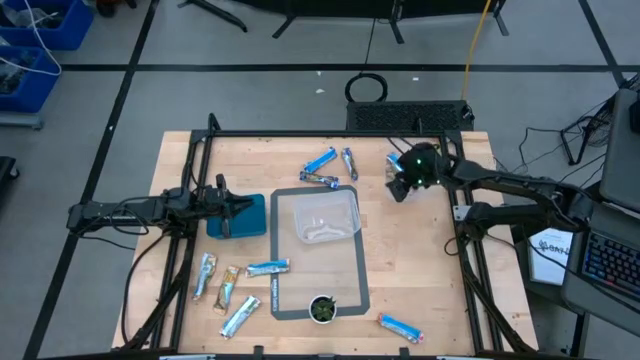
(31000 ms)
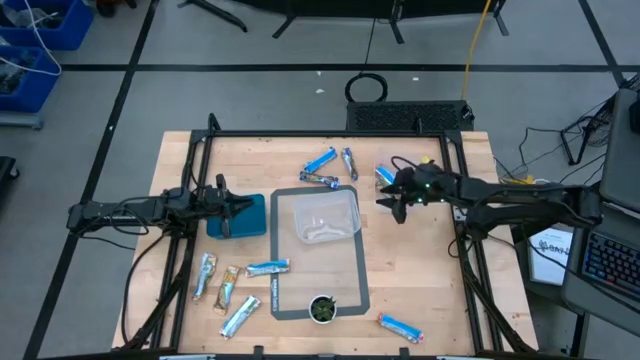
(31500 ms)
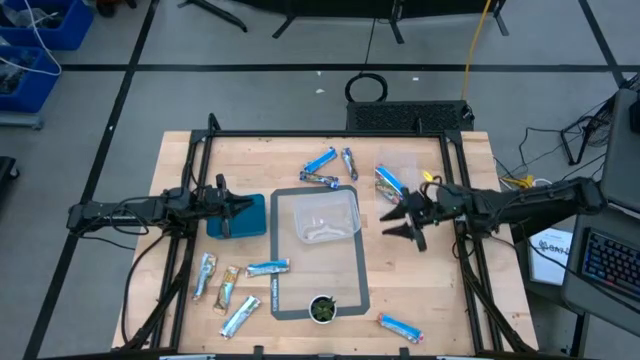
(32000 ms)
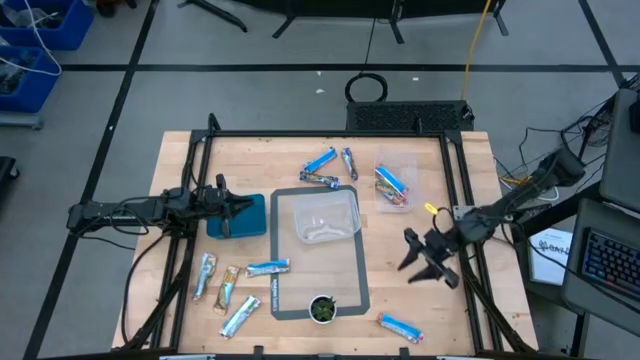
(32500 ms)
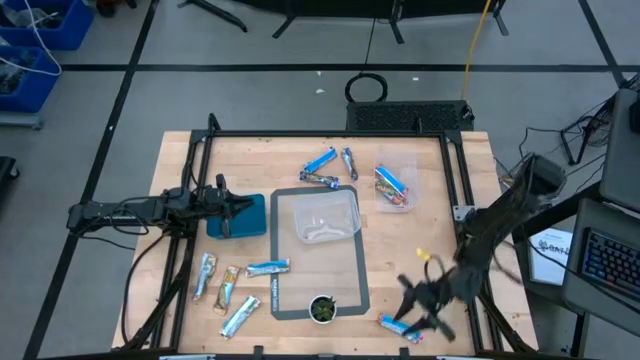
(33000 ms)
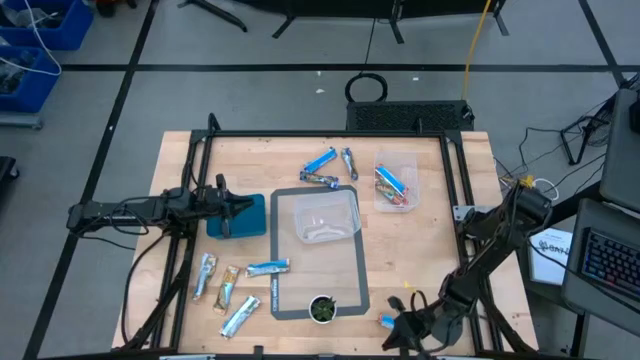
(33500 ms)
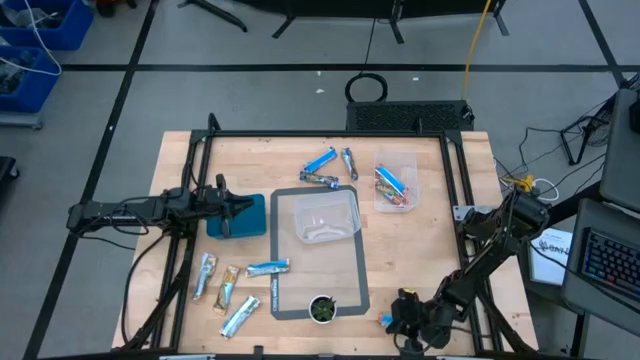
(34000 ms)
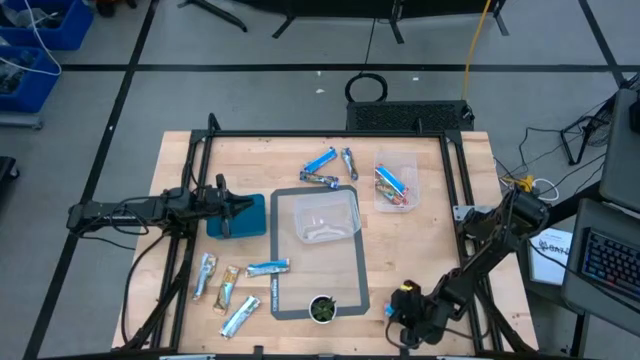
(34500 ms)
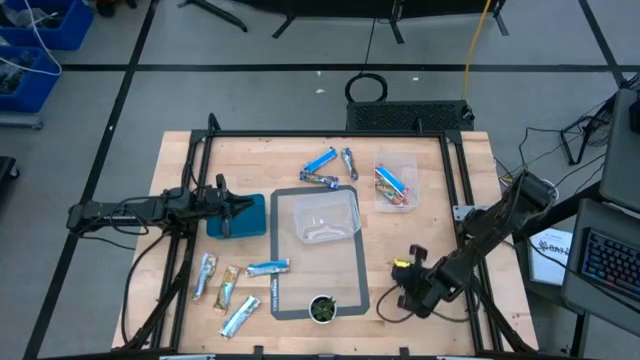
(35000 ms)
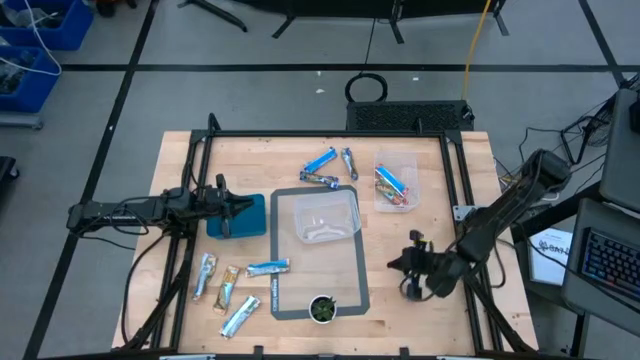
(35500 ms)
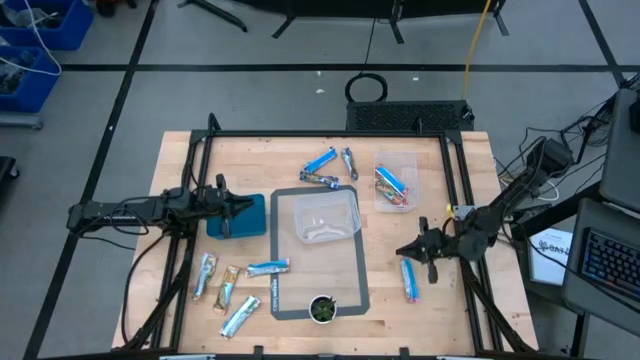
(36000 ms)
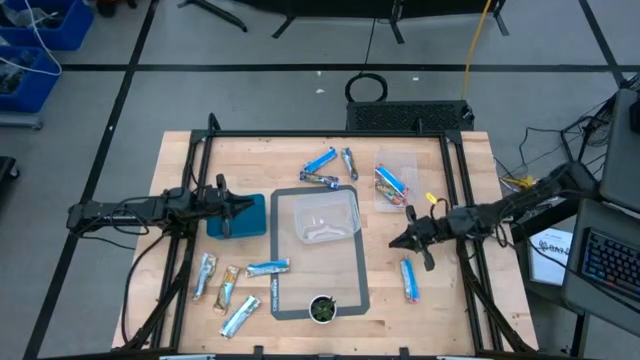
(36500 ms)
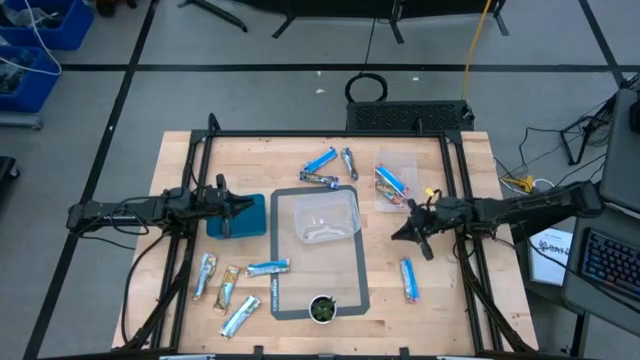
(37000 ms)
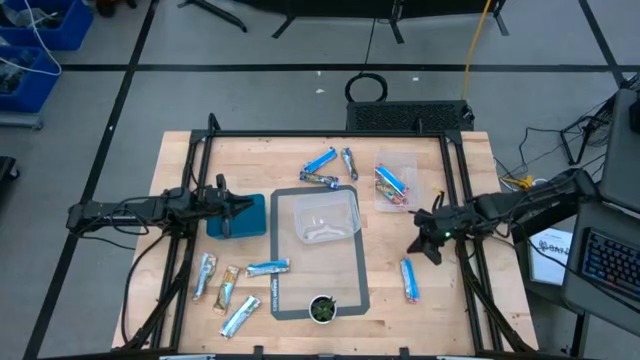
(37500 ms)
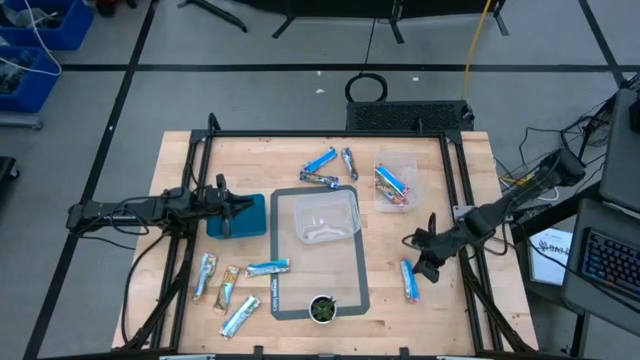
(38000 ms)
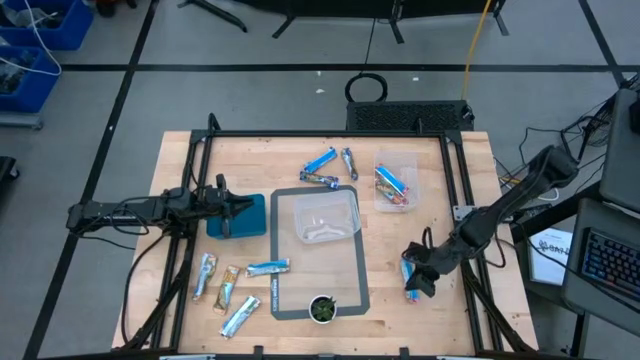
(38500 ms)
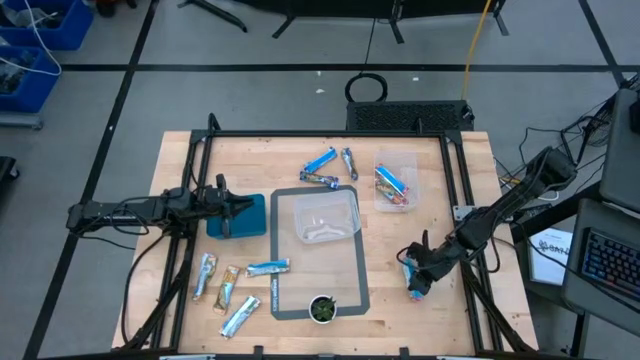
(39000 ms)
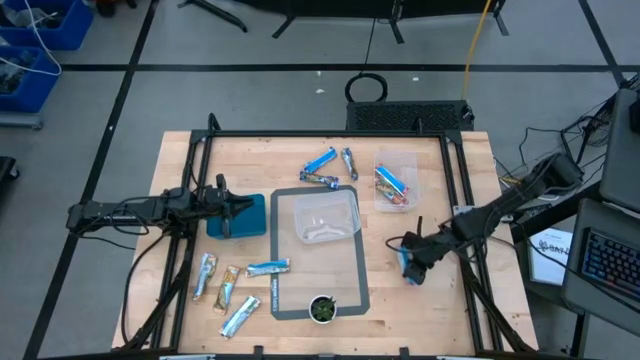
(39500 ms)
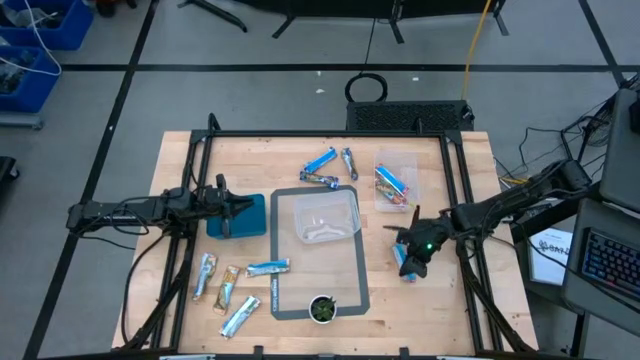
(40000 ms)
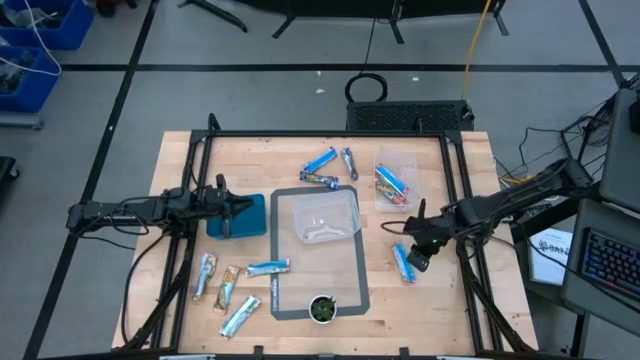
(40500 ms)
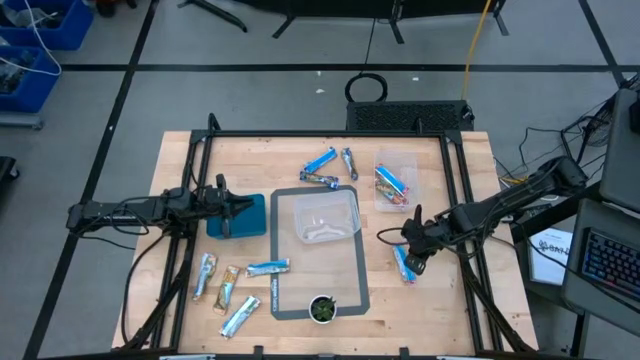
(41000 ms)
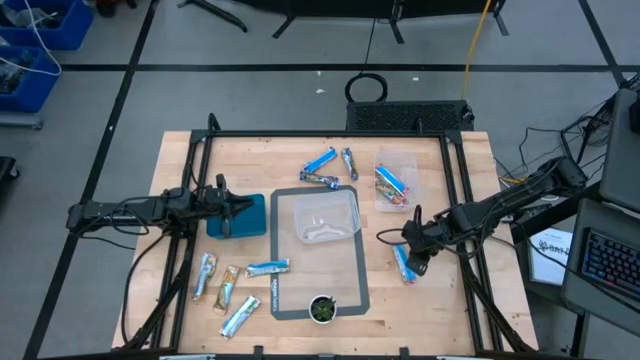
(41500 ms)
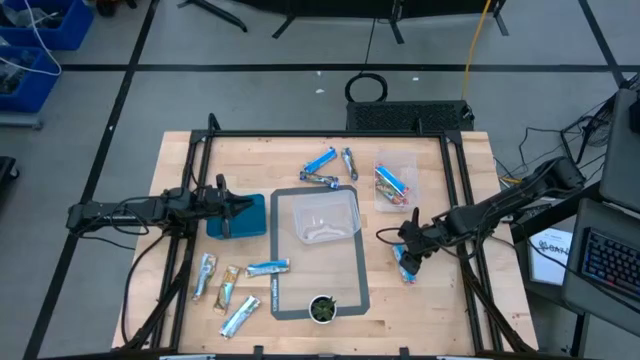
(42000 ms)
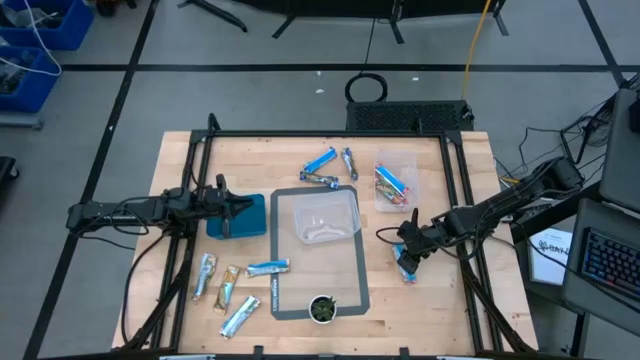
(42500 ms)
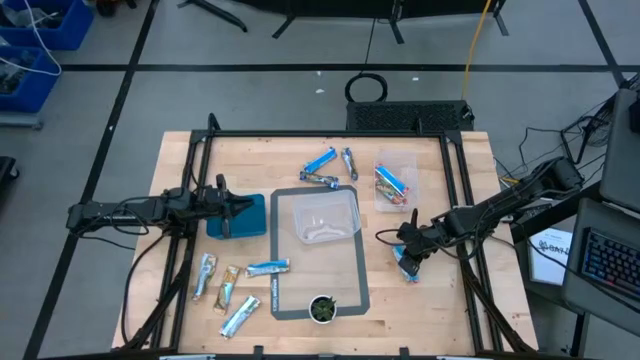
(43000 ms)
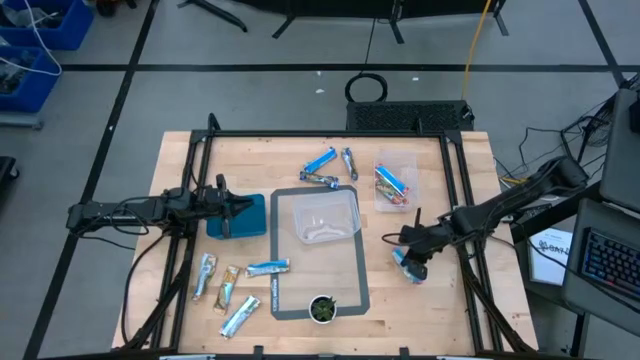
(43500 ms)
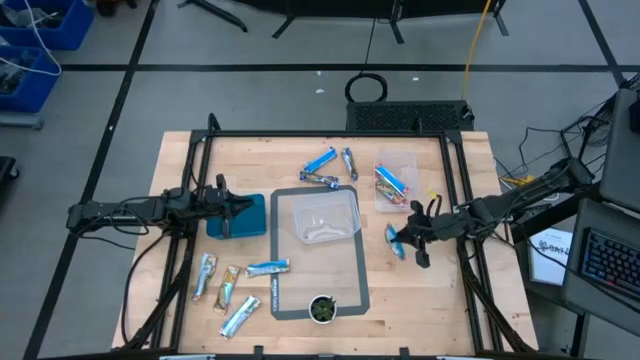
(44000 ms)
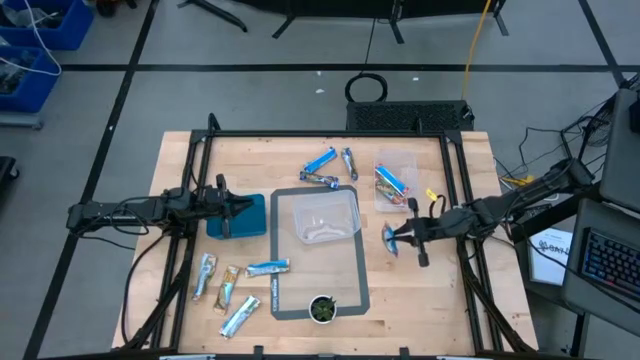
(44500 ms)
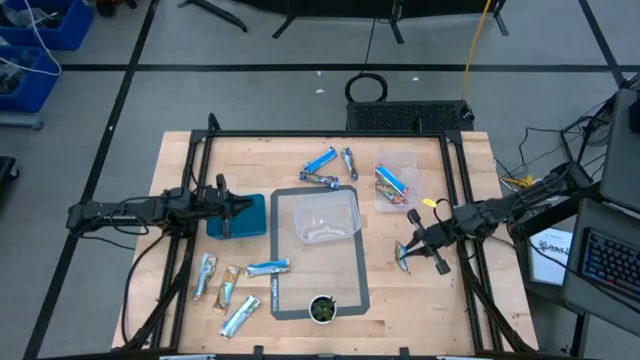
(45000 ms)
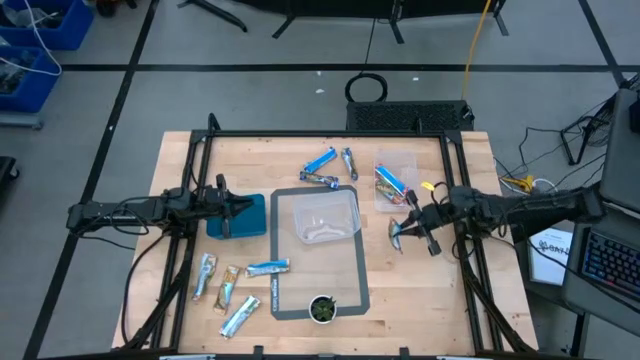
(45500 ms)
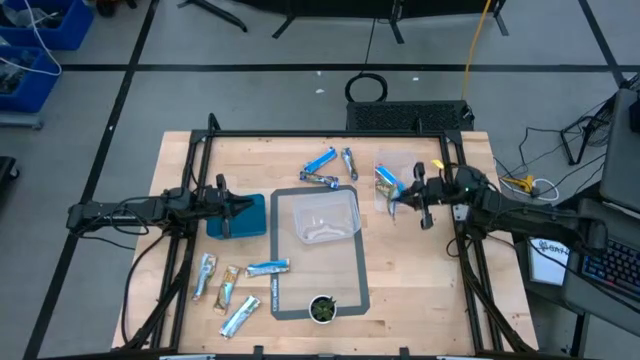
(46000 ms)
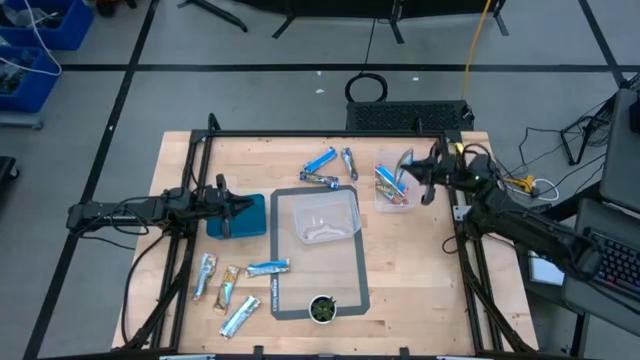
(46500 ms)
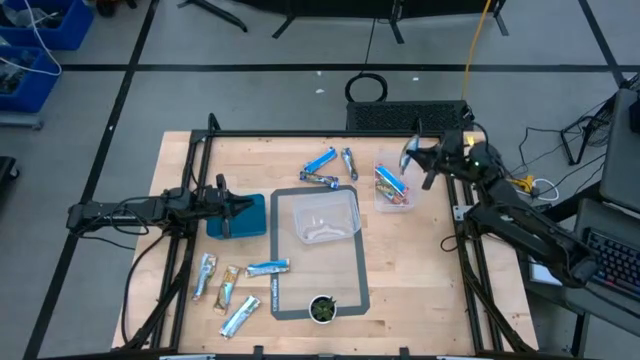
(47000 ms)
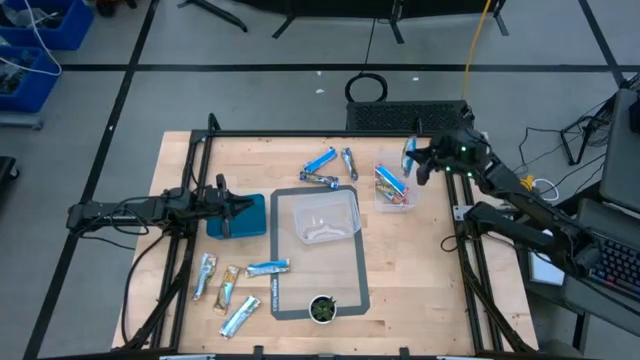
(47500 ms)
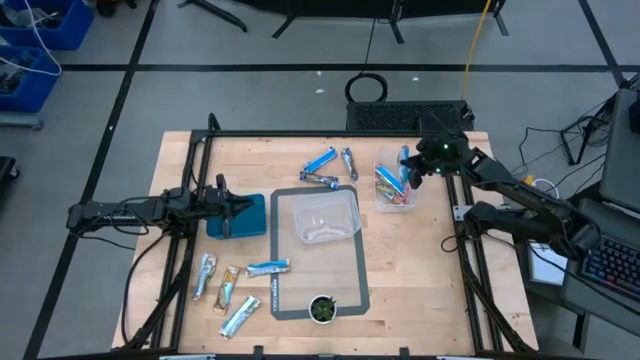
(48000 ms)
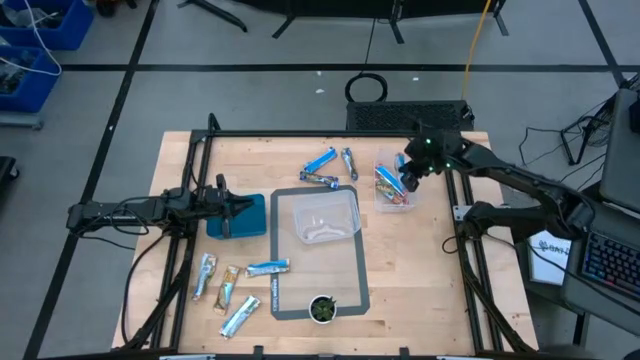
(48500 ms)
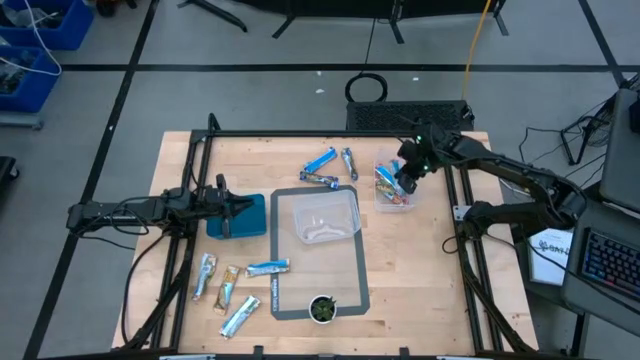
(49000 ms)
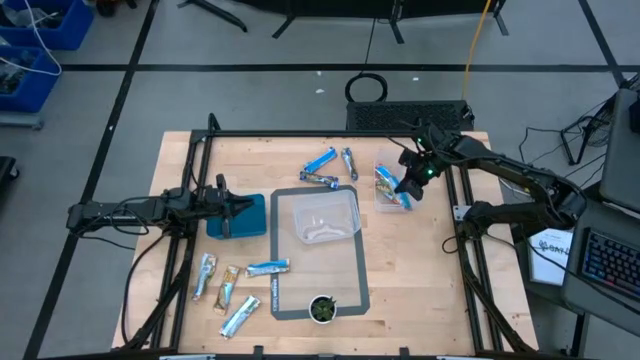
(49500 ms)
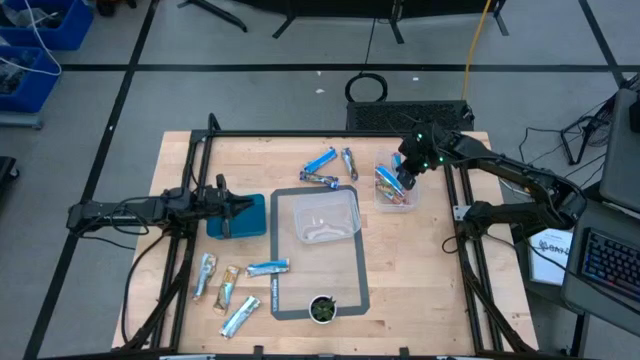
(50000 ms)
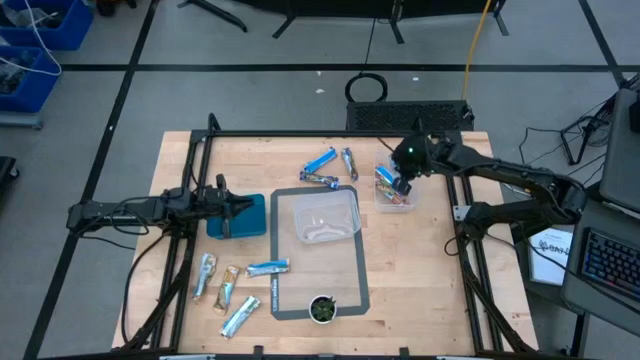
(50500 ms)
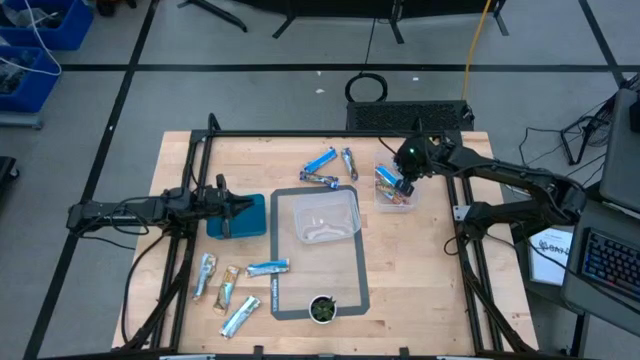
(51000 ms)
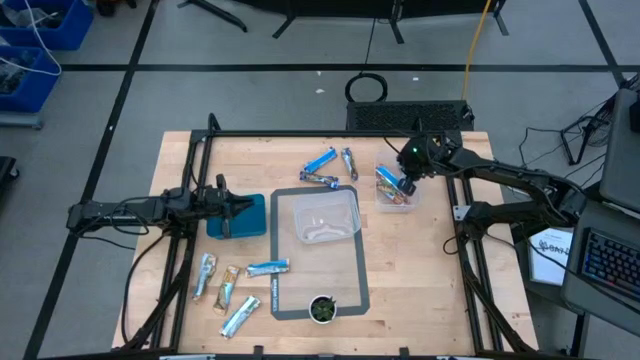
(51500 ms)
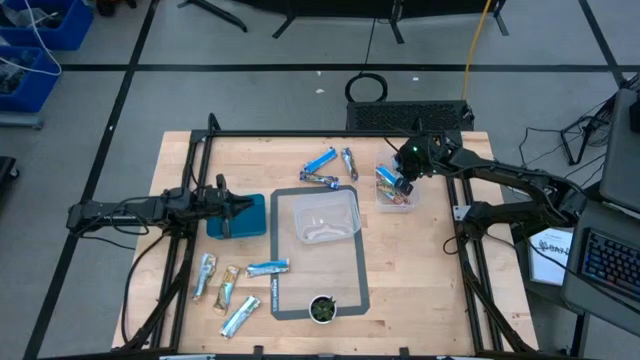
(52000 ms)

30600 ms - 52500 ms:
Task: Pick and place Granola Bars by type
Put the red granola bar into the right transparent bin
